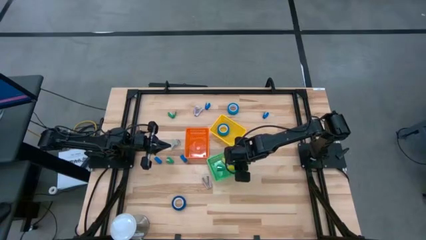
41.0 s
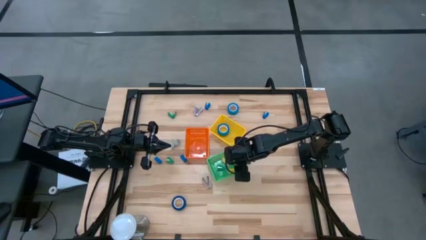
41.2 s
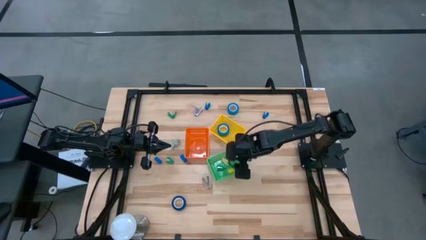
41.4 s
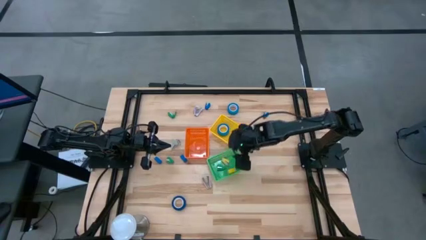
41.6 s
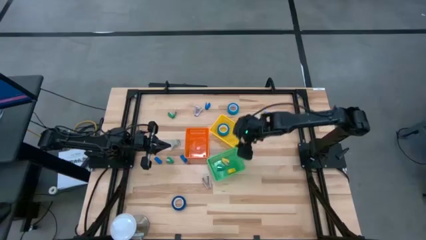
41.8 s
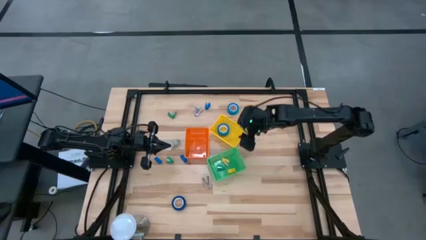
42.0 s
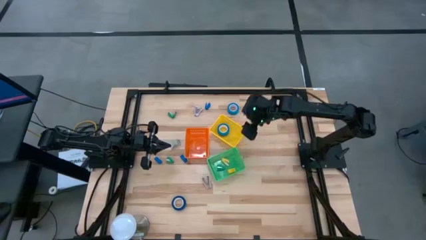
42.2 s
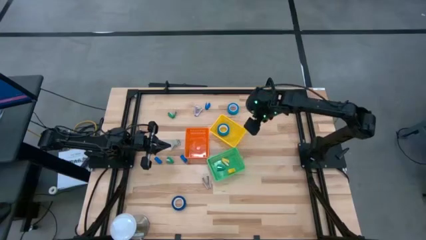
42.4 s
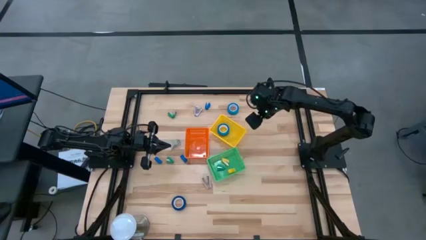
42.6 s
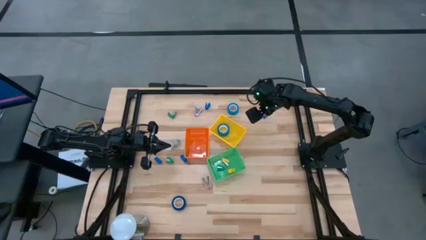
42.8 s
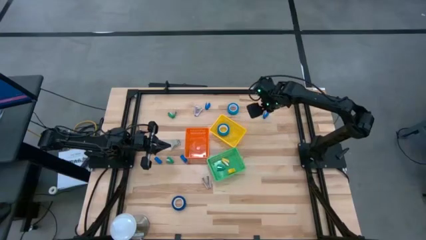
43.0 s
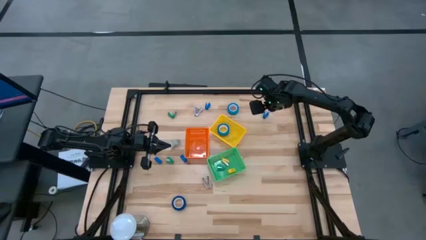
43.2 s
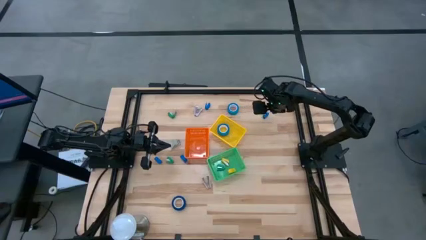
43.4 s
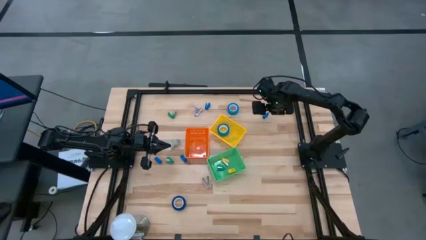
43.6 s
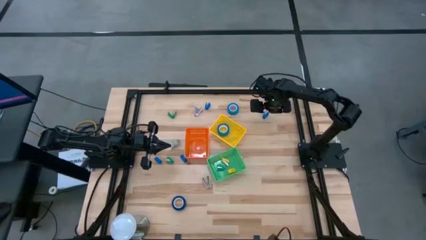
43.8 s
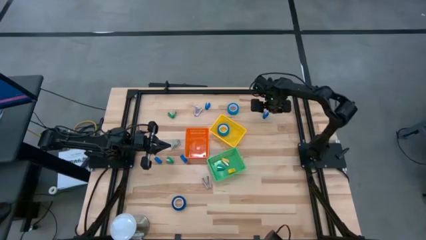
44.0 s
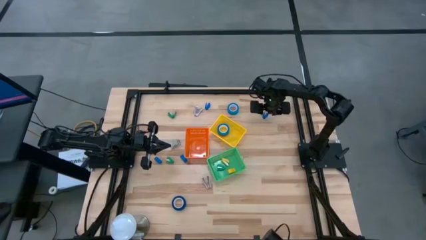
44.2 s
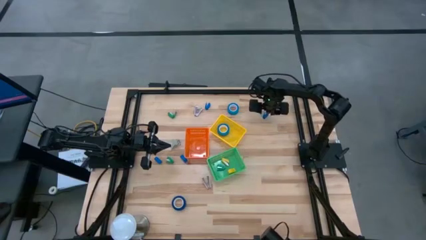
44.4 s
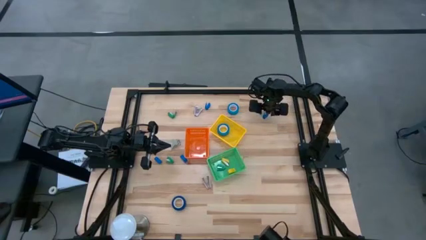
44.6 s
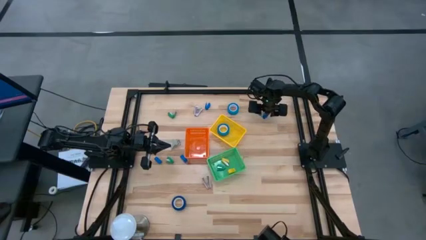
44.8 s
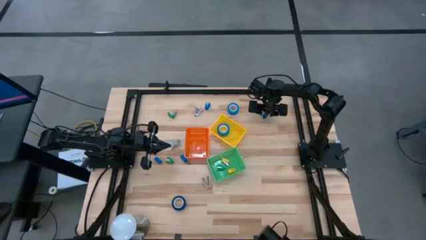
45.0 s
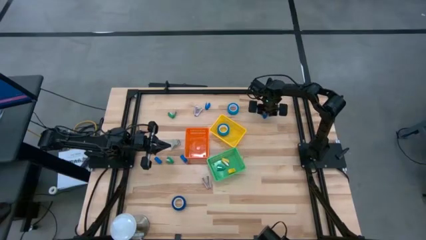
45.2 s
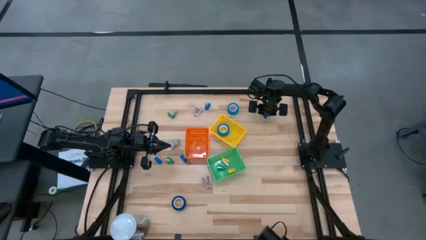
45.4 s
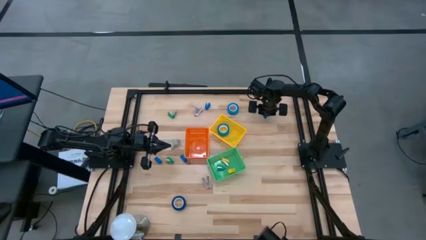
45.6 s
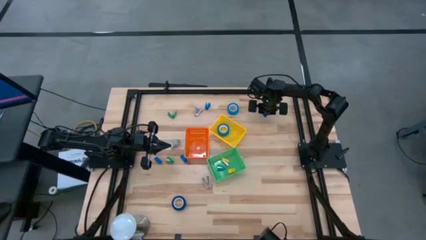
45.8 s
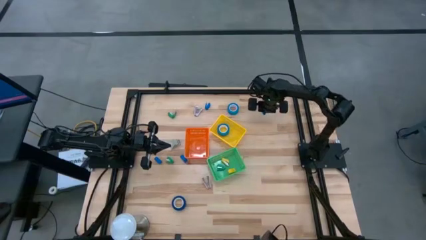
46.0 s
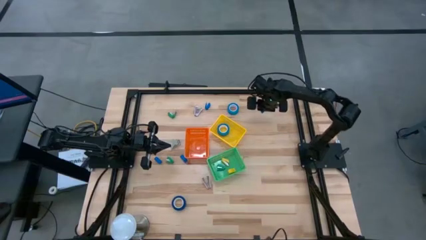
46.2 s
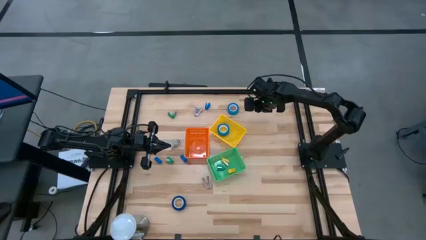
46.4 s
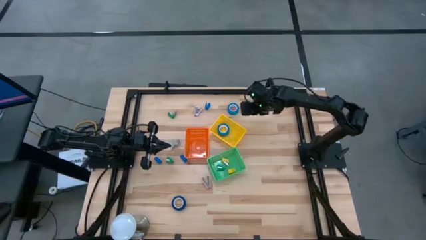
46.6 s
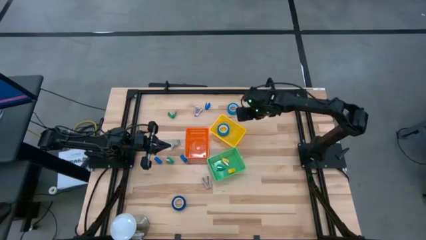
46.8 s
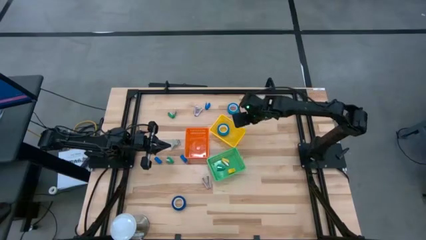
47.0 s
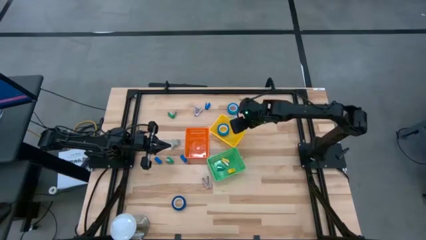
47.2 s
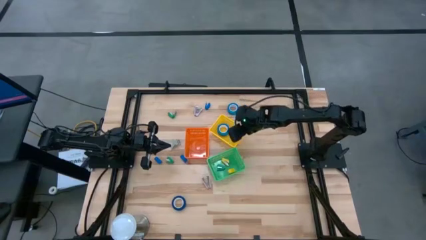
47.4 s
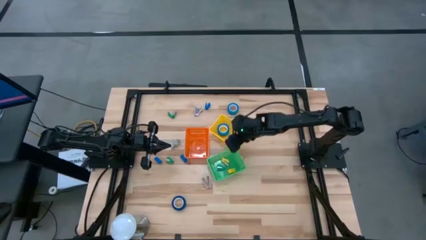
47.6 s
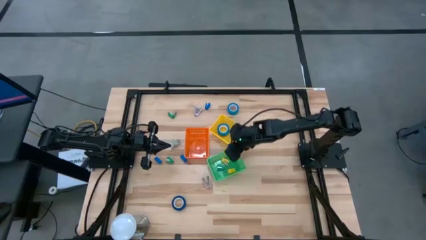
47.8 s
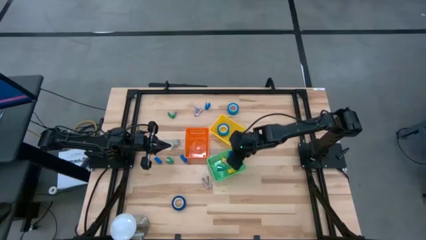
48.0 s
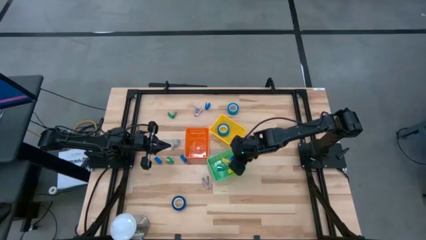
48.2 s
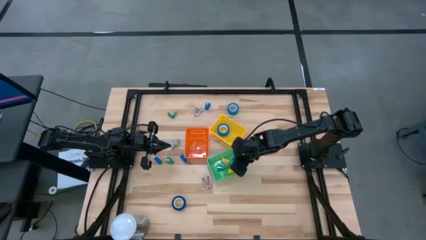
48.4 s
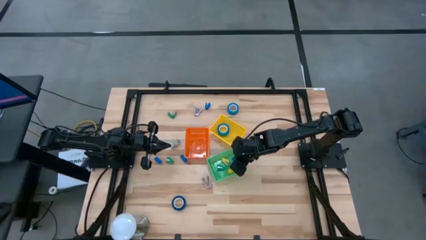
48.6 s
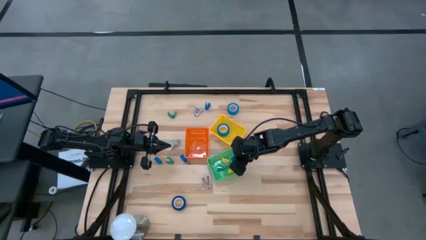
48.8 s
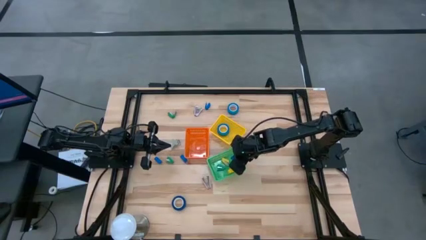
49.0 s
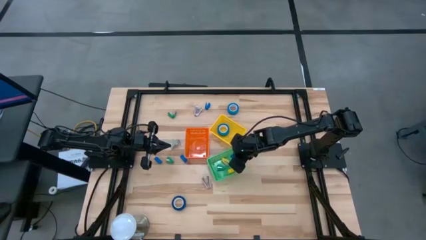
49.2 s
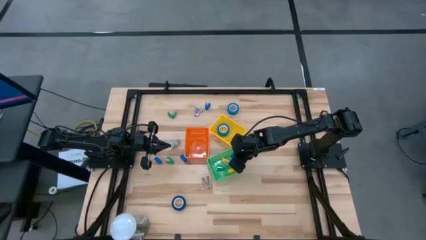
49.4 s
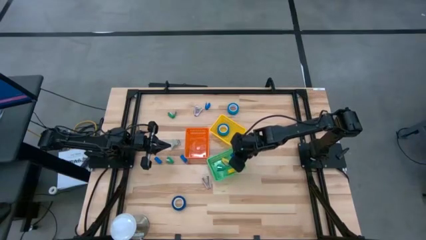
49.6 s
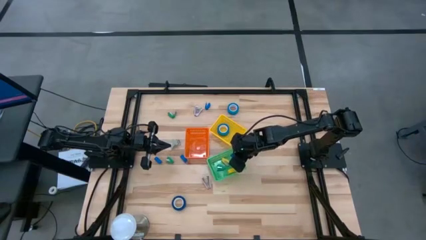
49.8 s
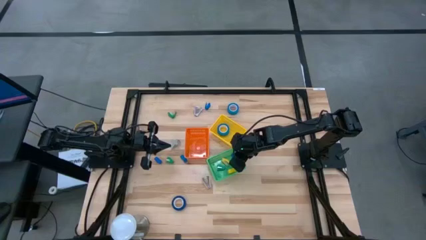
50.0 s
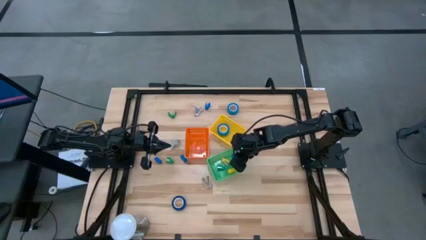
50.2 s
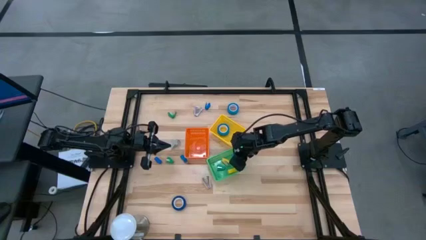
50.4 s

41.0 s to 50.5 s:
Task: Pick and place Stapler, Stapler remover, tape
Put the blue stapler into the green bin
